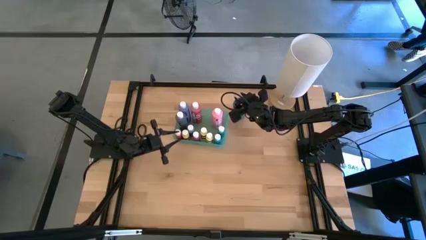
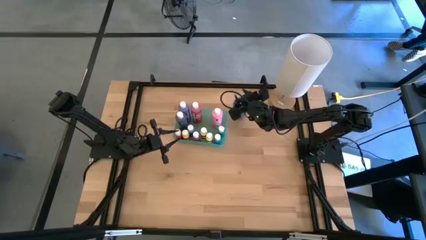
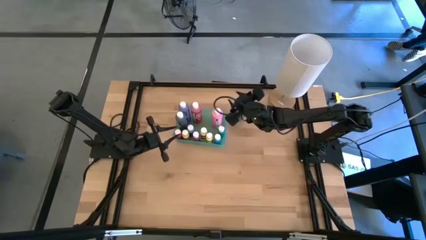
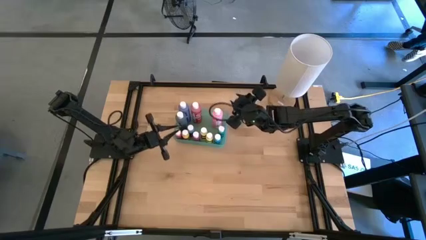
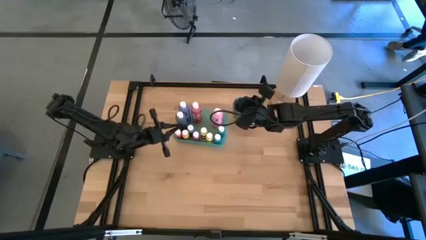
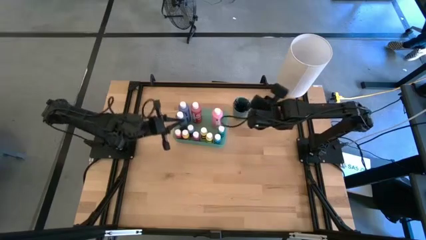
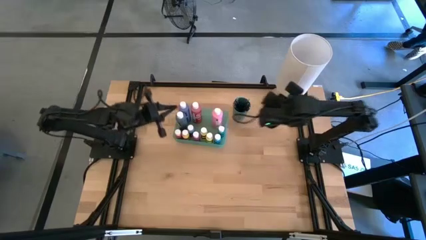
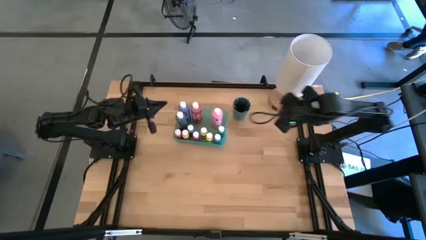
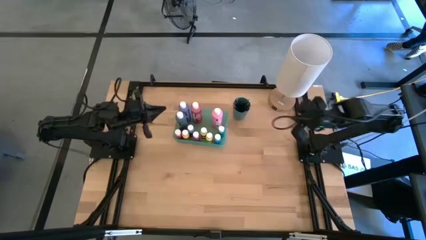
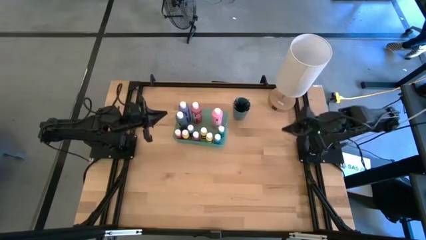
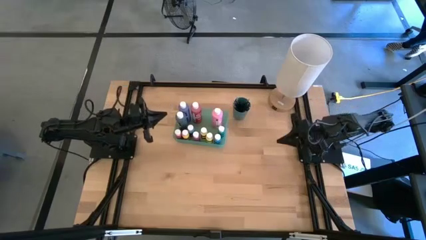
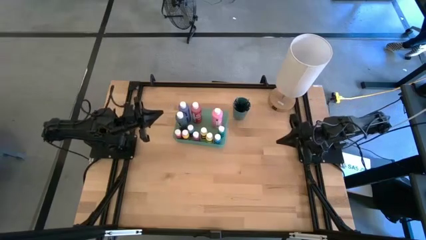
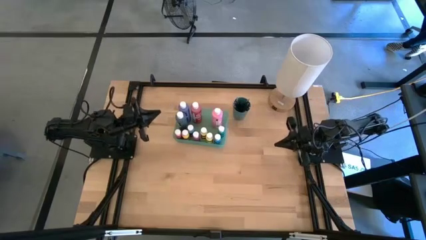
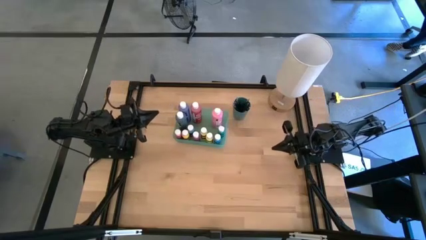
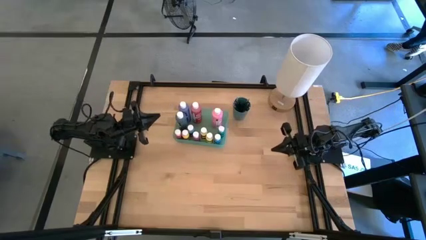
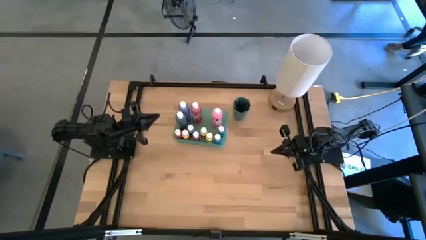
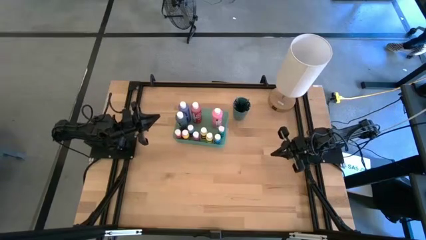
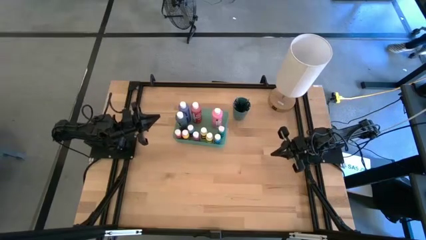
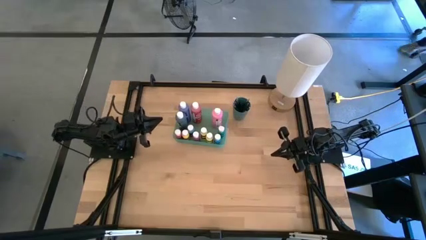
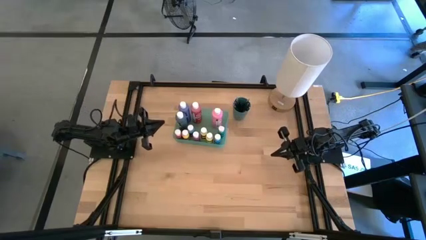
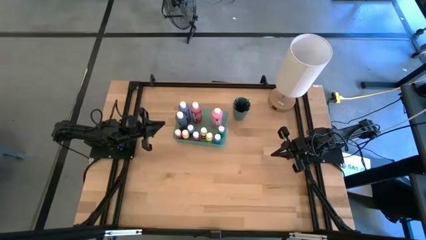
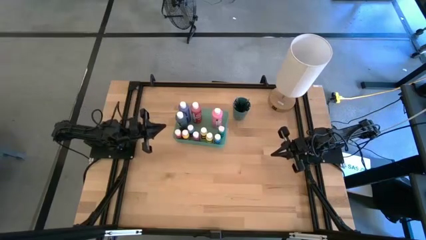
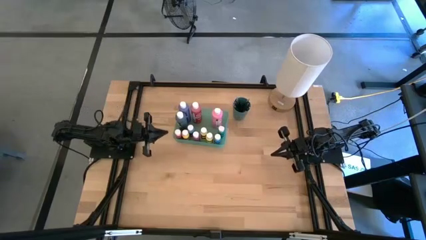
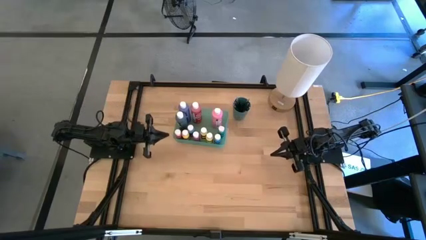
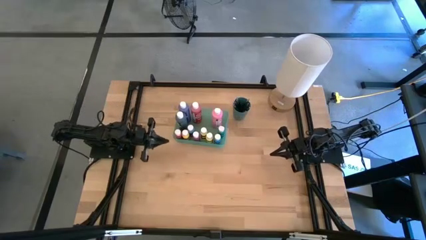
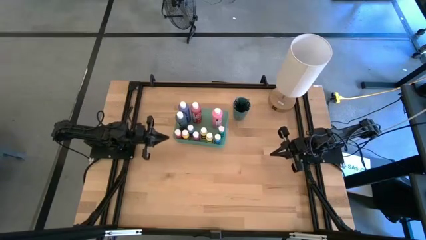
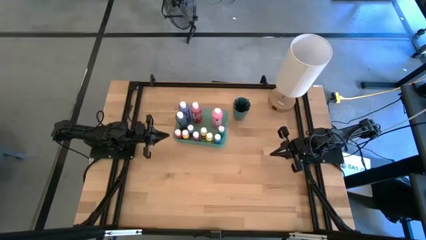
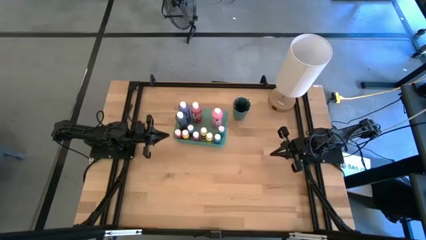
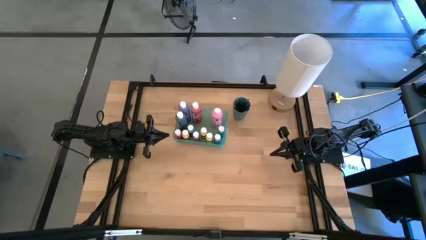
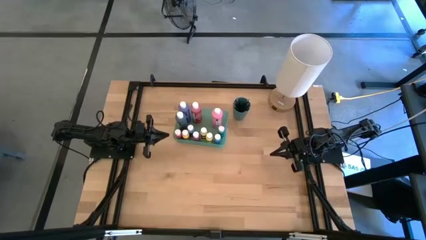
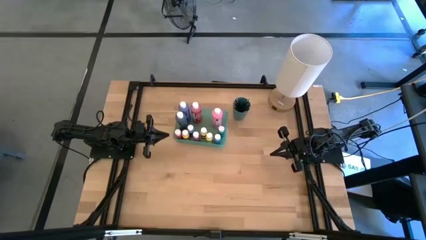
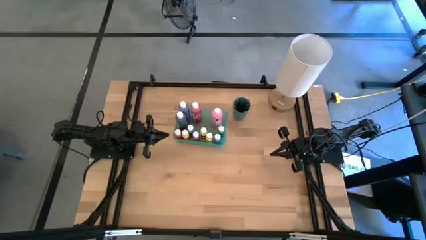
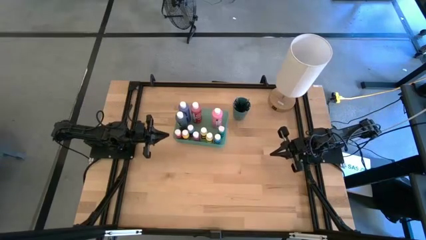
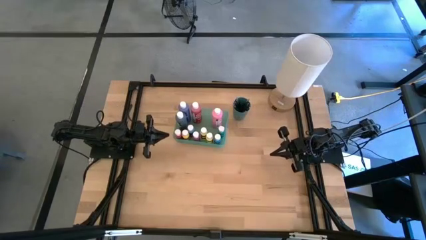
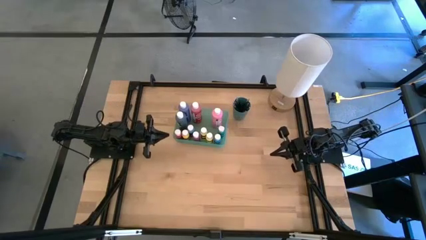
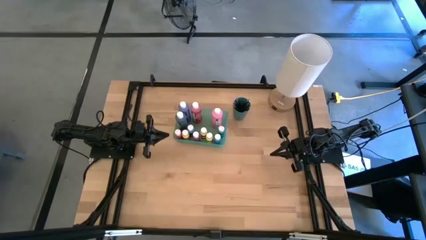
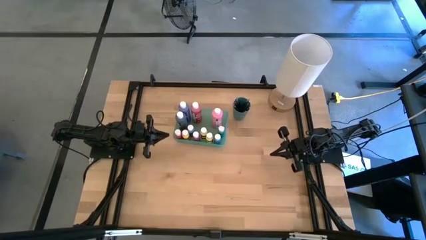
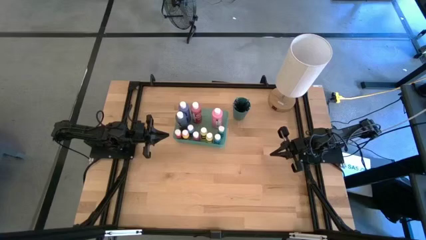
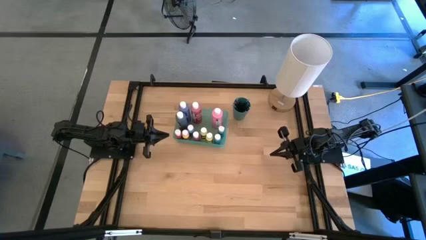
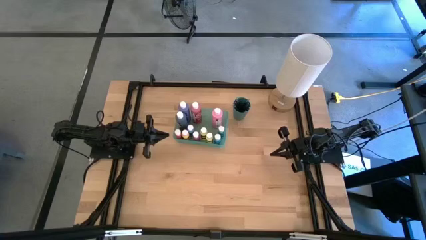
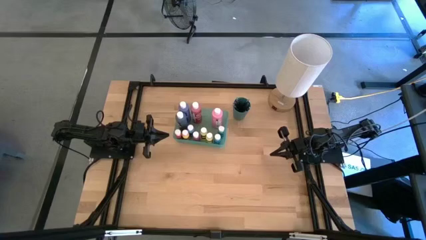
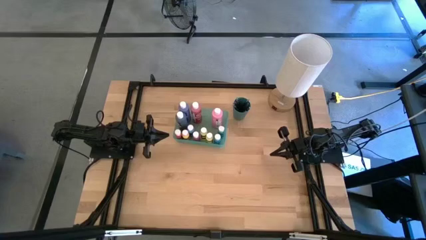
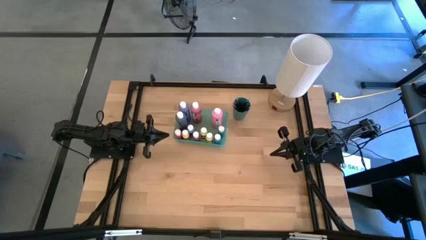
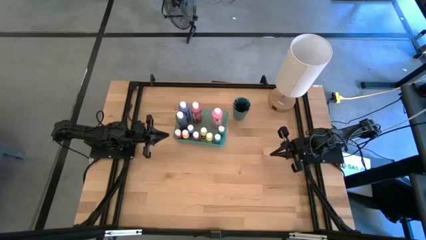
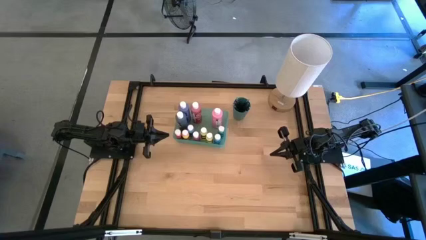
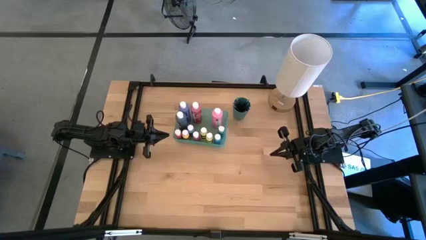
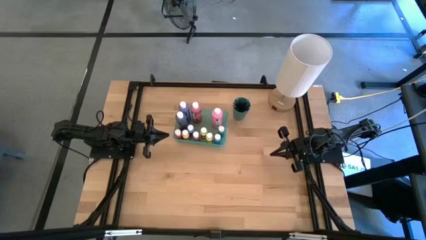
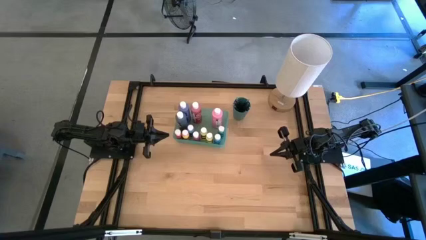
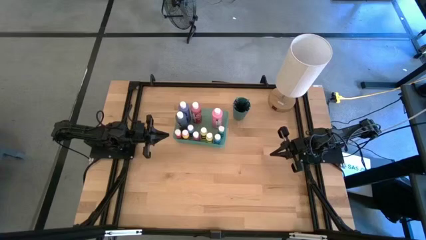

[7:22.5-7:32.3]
Task: Pick & Place Paint Supplies
Return to Home Position
